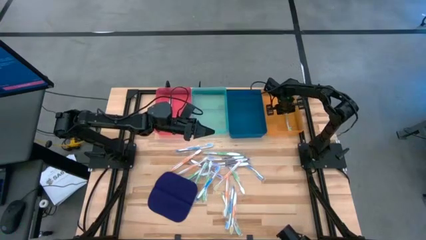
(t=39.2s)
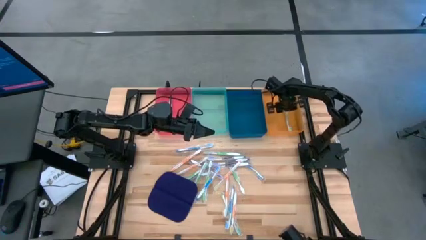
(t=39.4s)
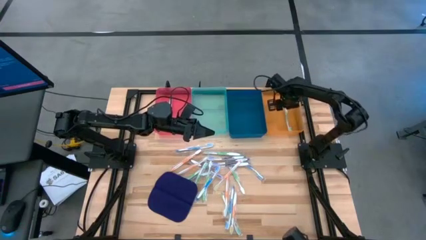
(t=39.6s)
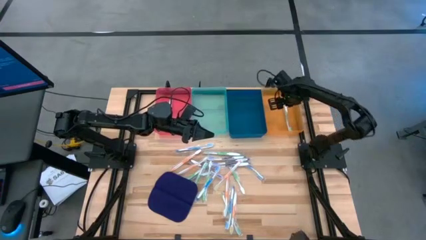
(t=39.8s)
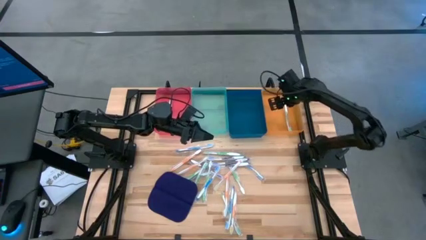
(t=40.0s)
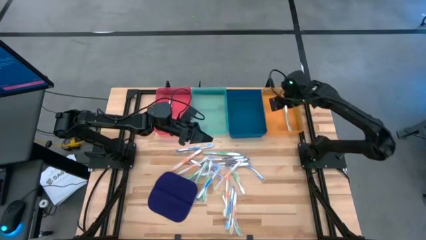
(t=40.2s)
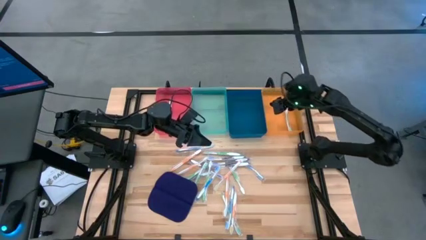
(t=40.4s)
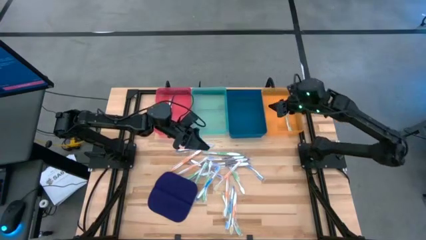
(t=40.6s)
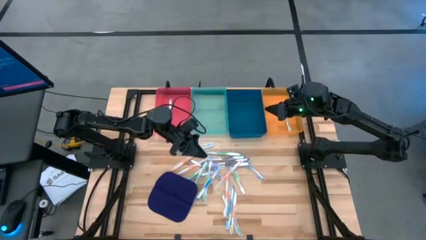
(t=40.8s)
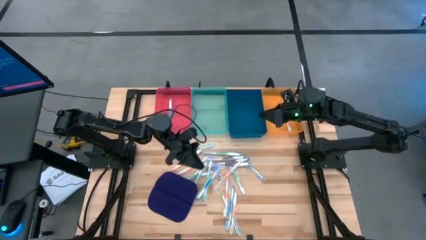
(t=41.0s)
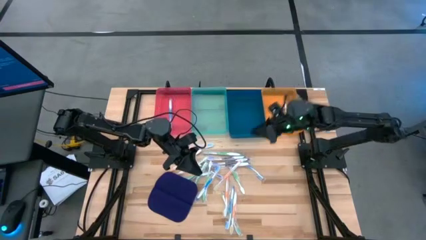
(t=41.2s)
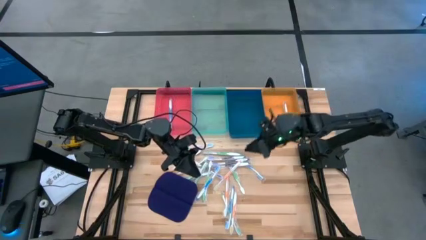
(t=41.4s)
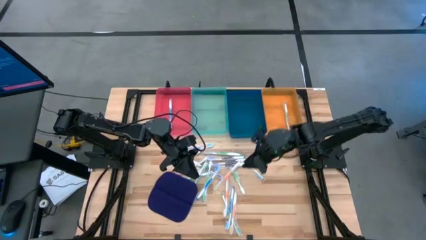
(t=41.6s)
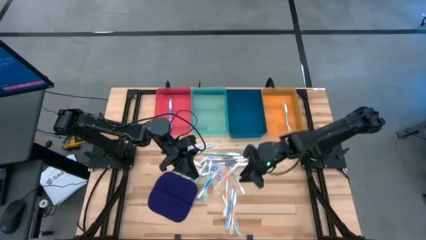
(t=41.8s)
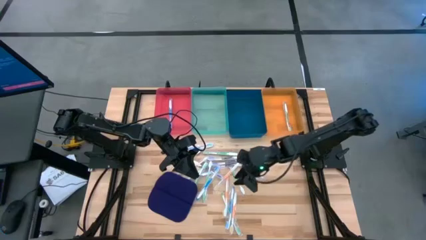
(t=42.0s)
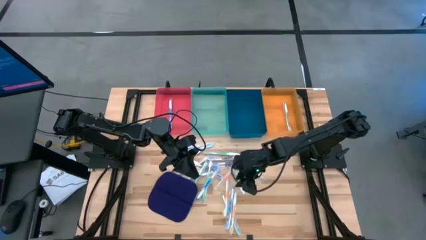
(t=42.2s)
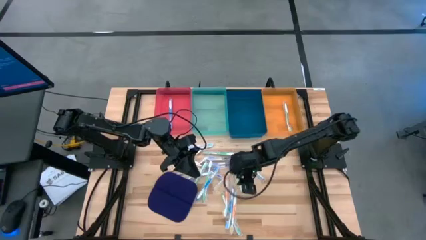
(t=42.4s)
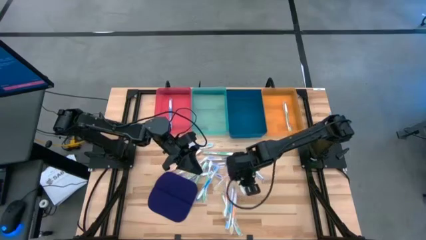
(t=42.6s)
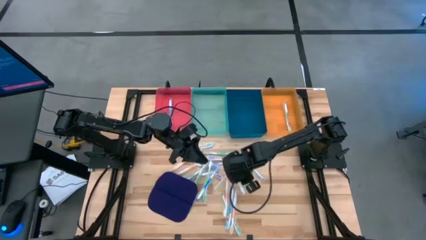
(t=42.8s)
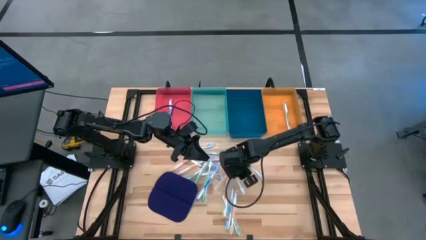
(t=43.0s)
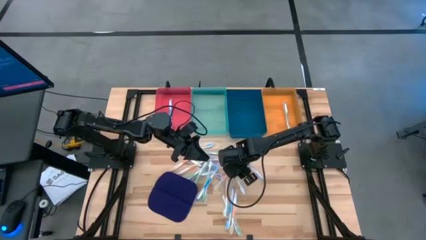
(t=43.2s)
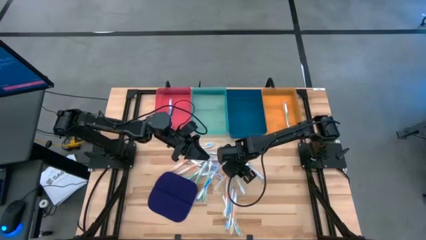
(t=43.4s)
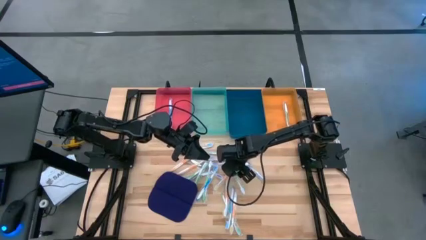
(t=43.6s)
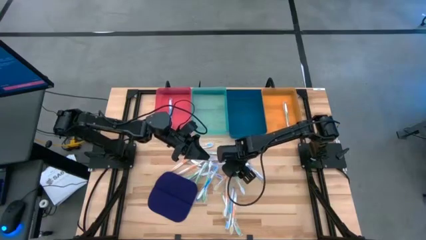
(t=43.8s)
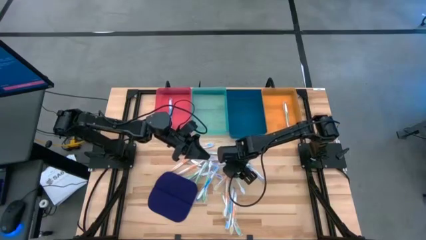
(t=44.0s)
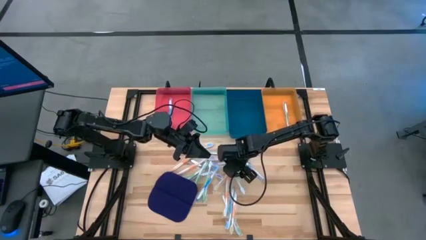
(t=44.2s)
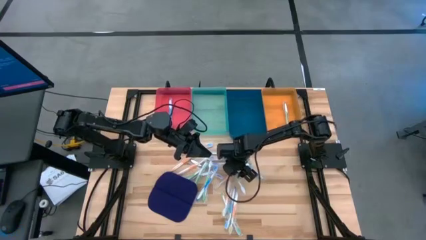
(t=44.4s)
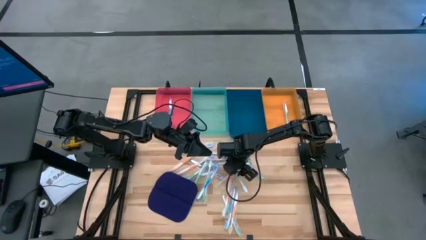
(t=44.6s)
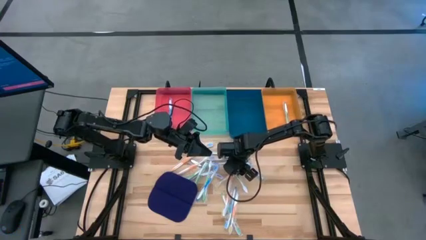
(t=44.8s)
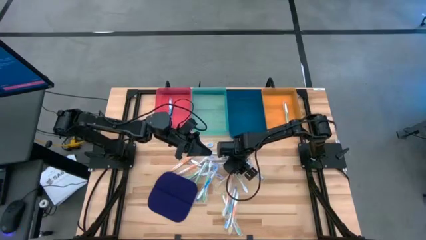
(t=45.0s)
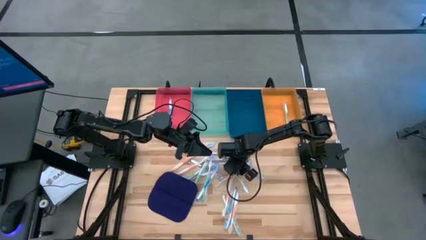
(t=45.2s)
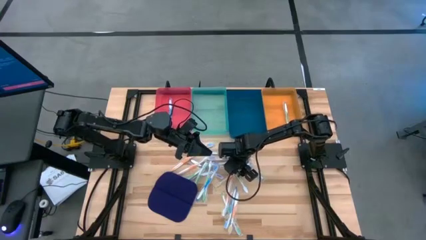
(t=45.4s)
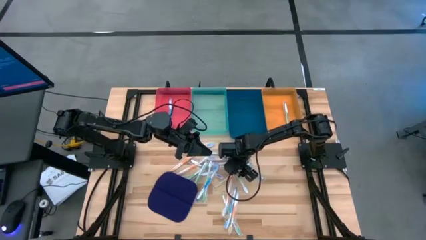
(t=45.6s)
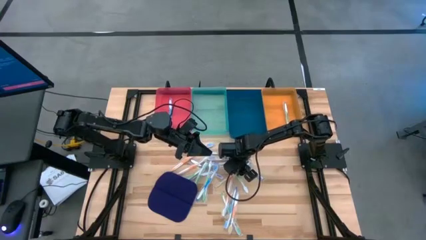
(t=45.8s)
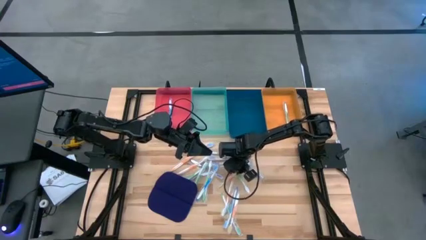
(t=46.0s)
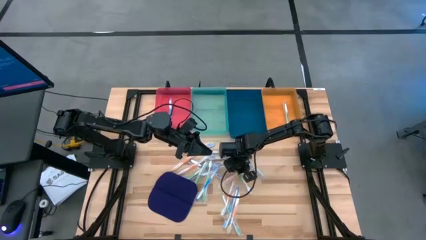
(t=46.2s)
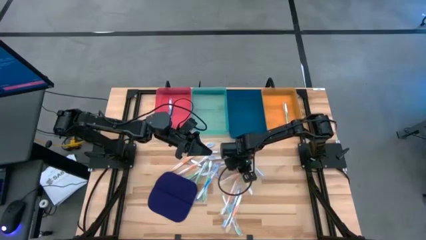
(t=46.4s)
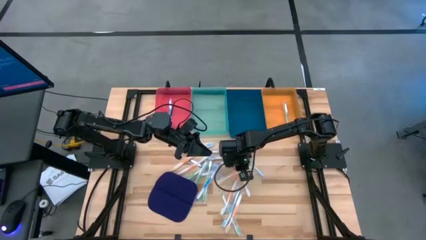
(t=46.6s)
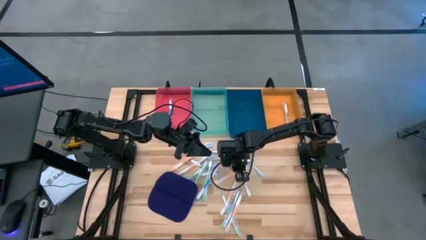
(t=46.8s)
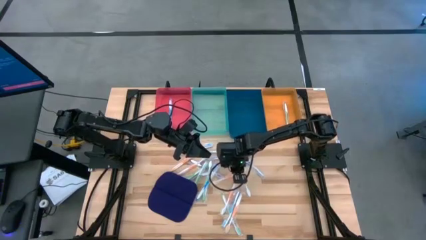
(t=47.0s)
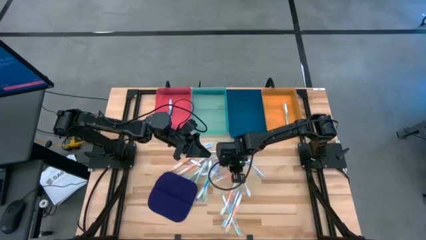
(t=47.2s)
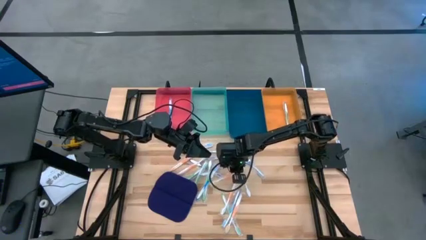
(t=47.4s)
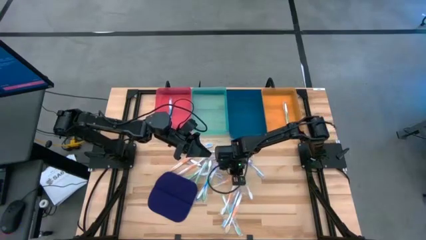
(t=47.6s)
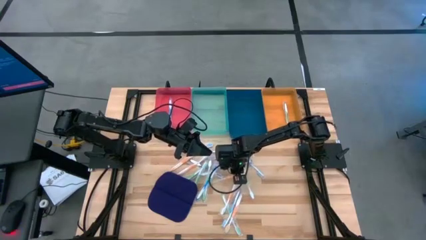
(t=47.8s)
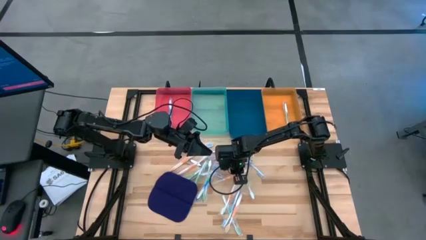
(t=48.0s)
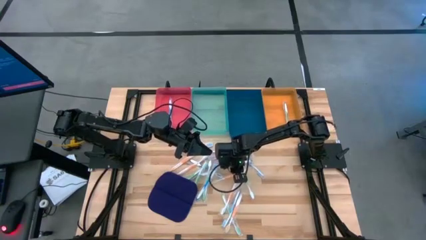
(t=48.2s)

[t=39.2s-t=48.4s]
Task: Pick & Place Toothbrushes
Put the orange toothbrush into the blue bin

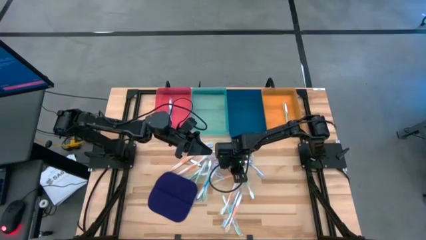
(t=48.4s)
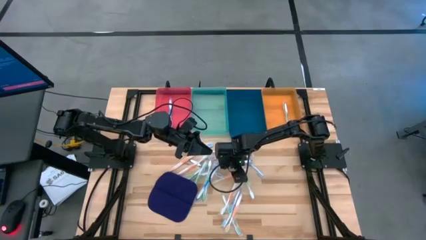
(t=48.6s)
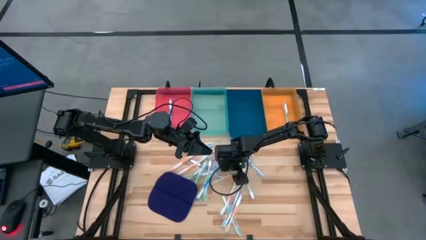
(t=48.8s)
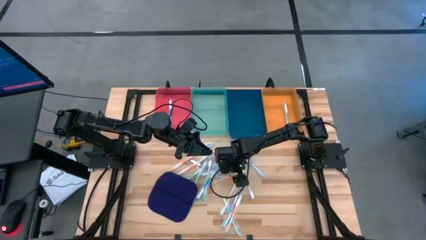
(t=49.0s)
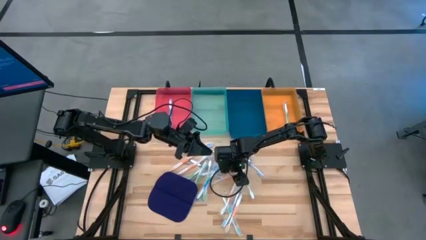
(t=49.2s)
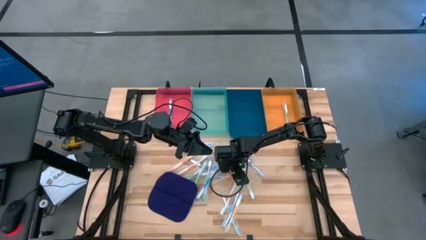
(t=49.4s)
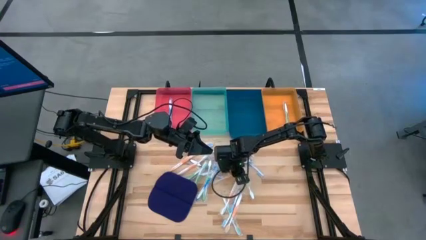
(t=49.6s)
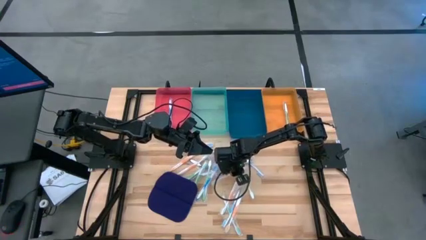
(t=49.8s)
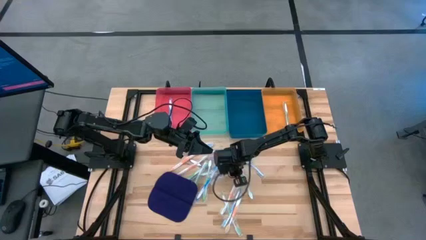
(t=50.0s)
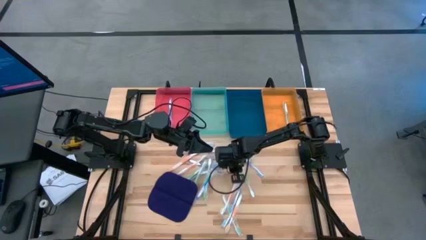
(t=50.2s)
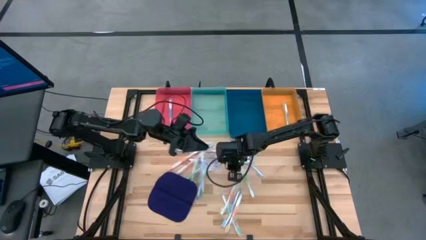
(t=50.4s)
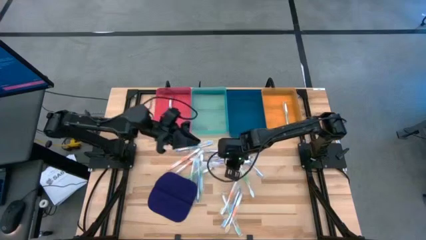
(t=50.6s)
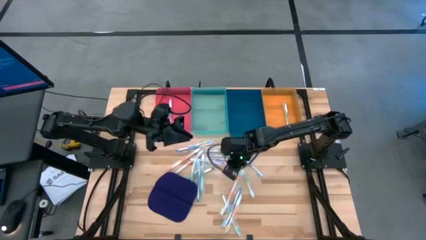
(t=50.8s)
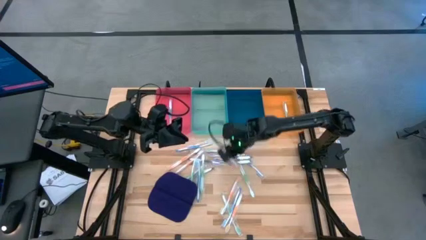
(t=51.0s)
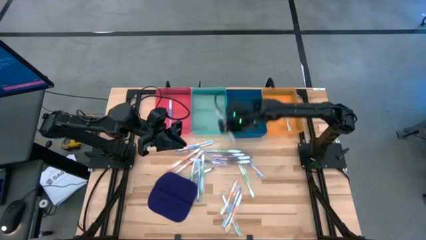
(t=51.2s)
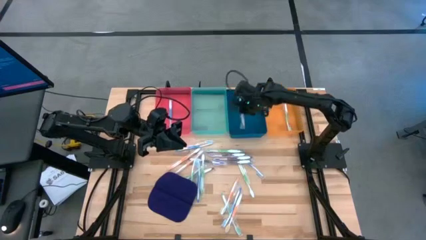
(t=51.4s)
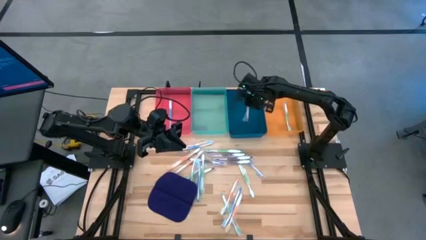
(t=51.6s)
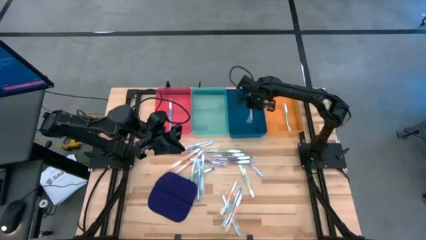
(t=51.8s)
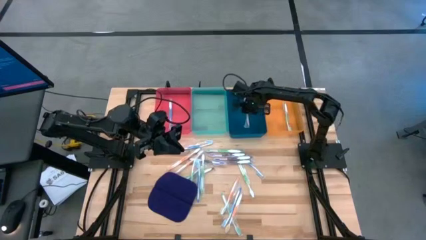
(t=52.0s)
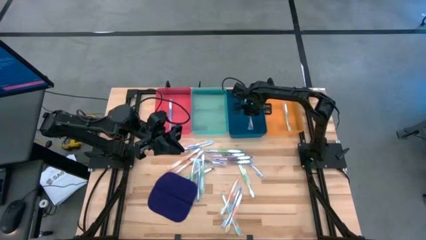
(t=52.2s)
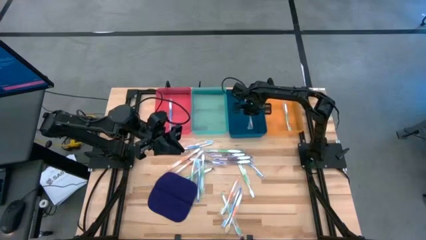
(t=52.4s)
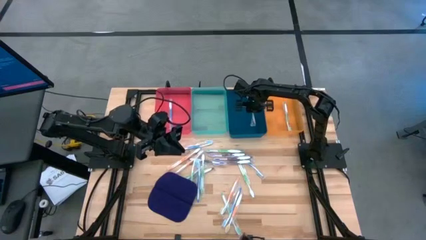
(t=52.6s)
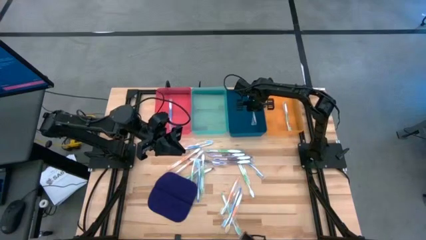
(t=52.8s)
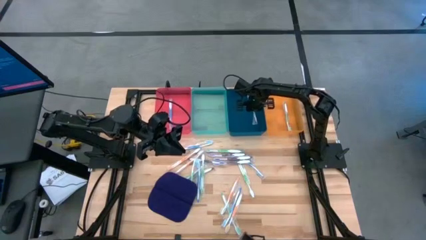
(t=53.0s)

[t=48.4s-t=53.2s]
Put the orange toothbrush into the blue bin
